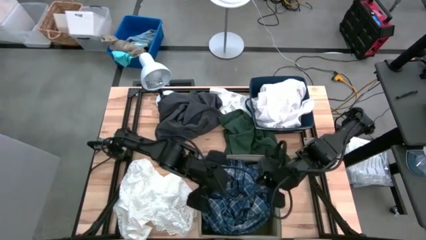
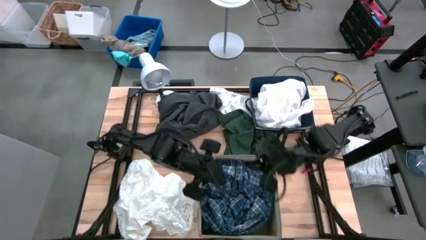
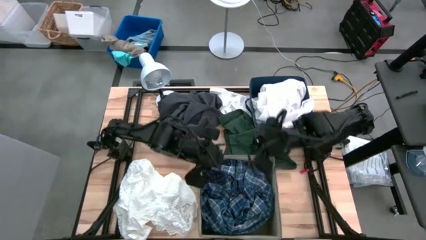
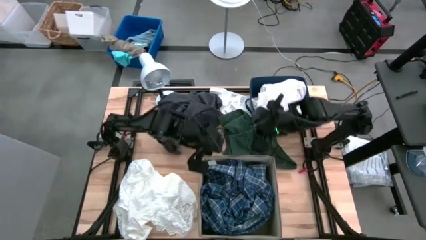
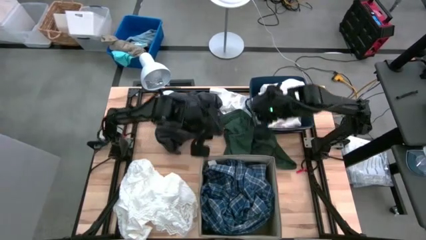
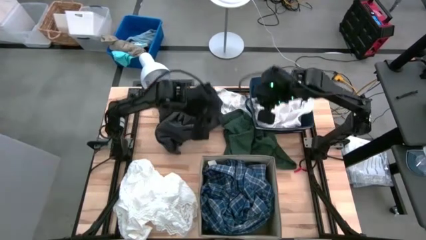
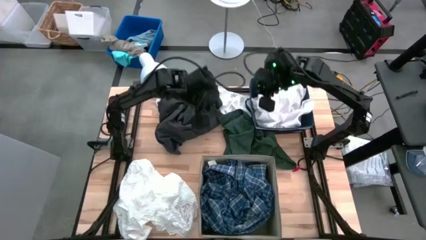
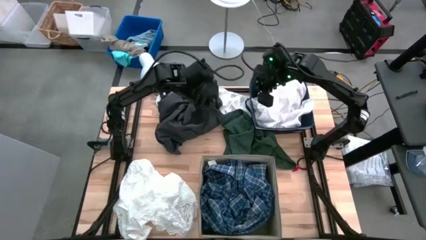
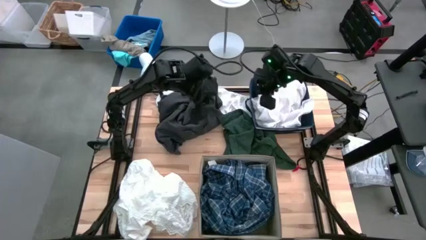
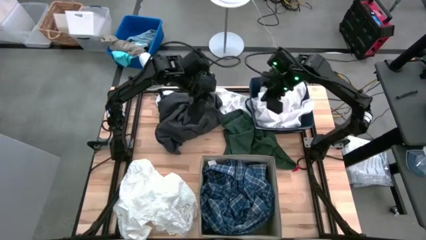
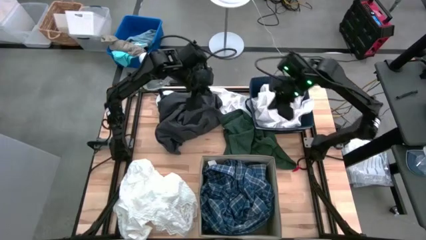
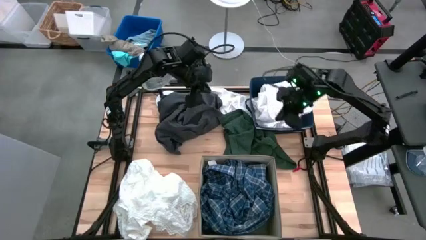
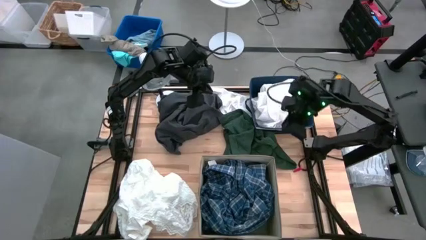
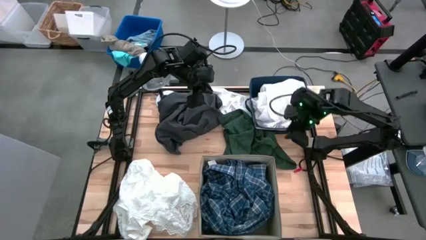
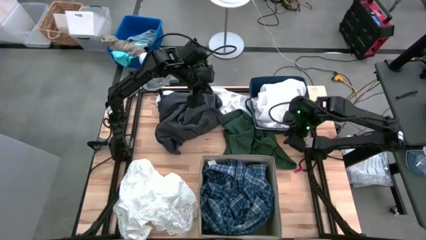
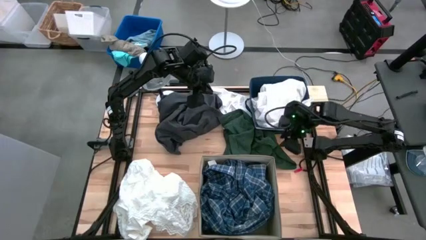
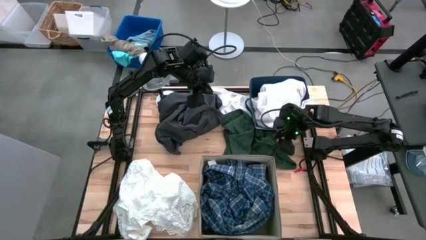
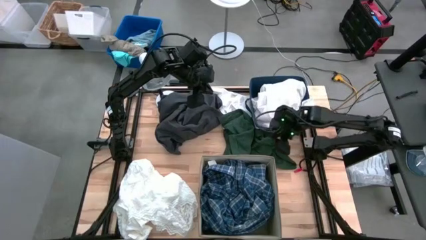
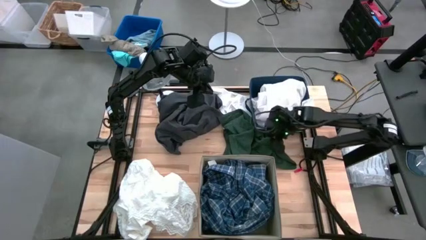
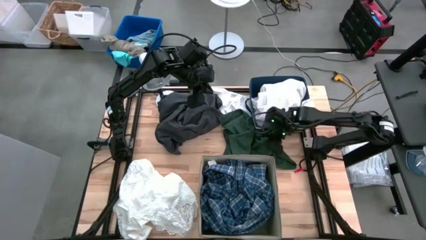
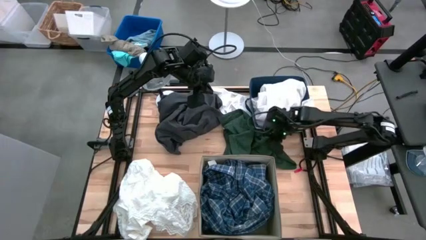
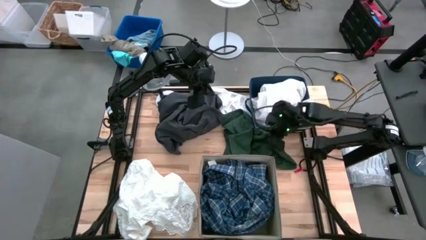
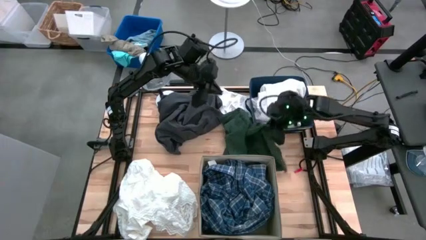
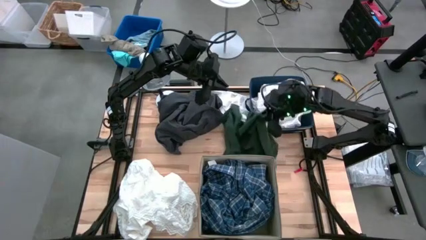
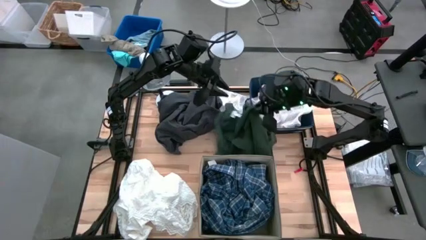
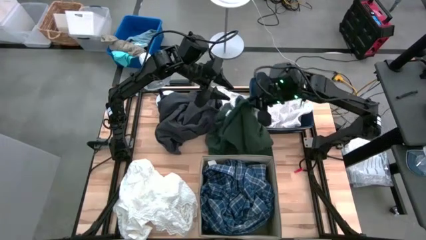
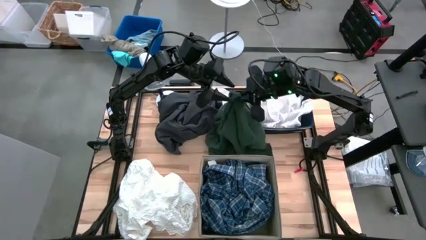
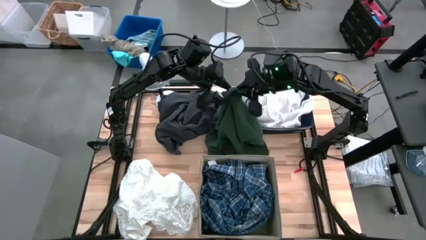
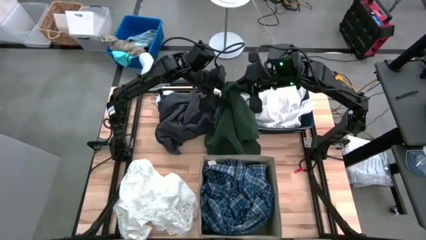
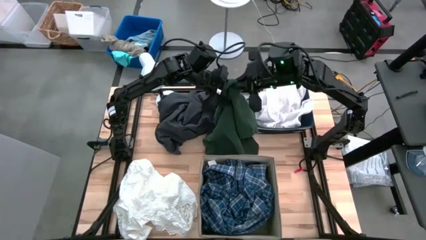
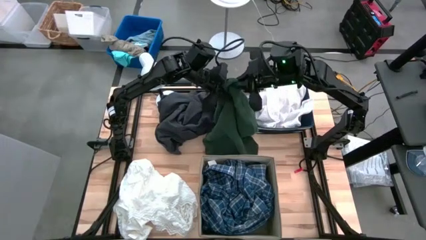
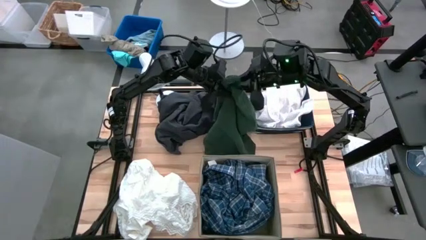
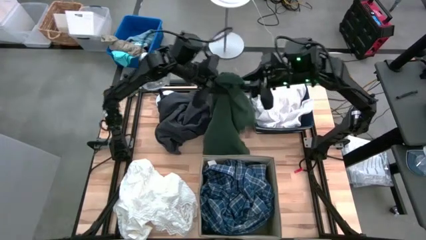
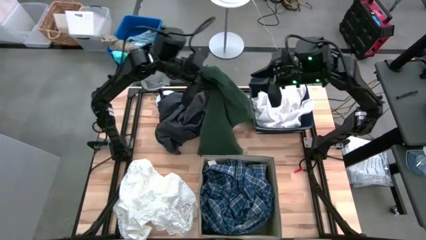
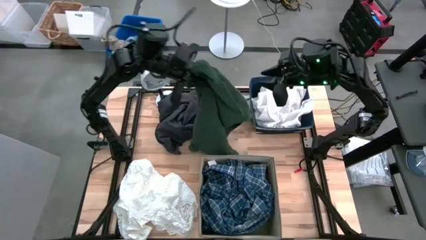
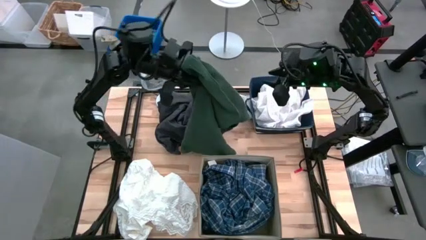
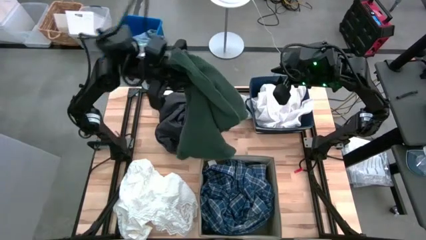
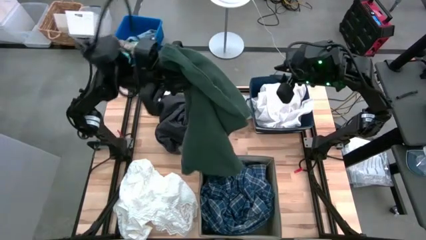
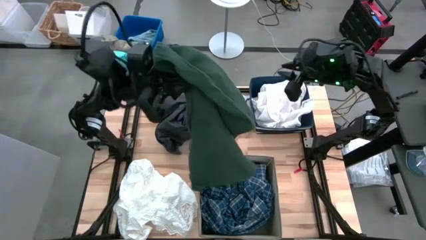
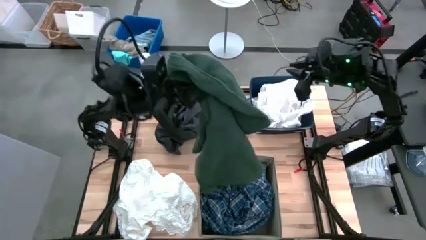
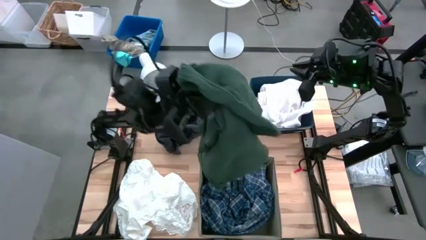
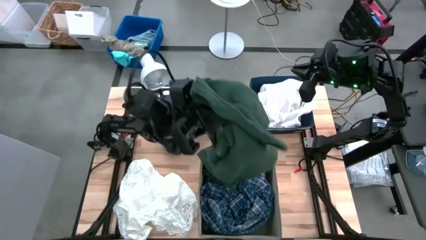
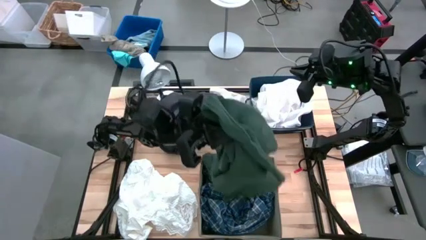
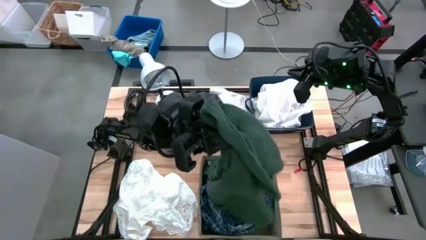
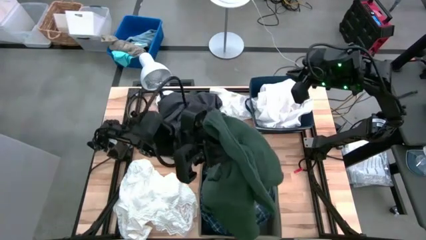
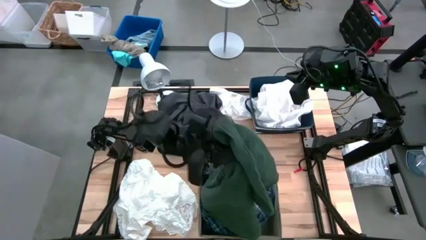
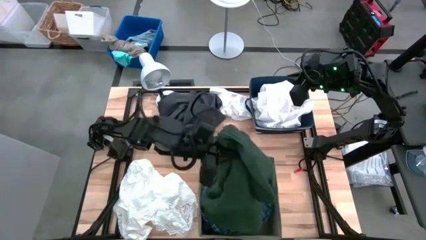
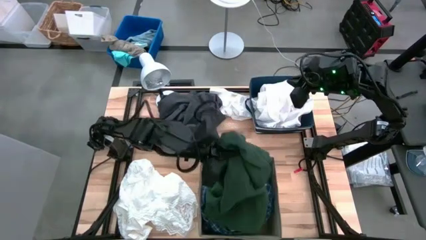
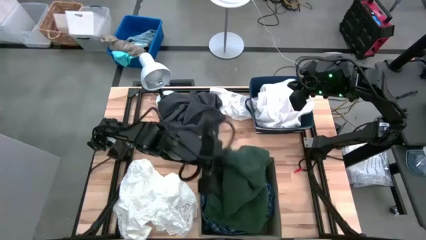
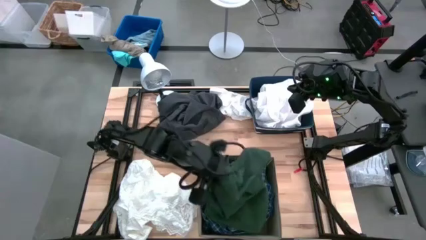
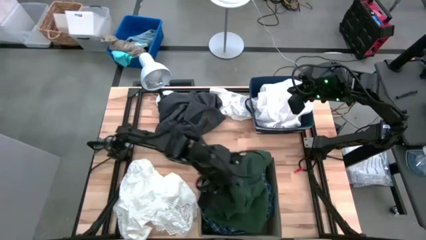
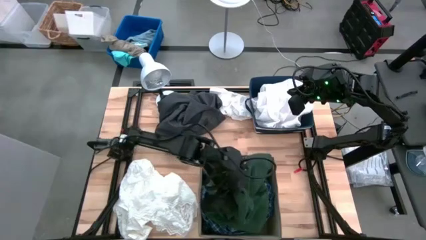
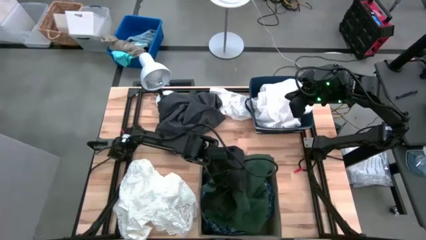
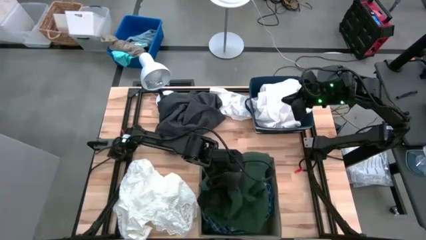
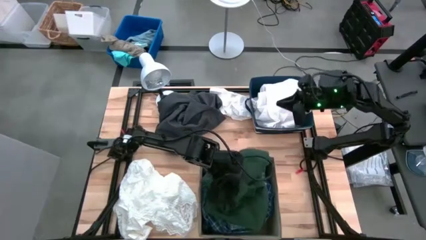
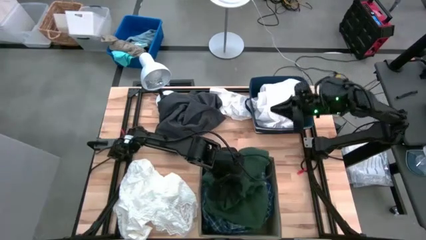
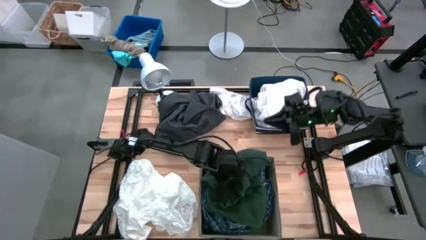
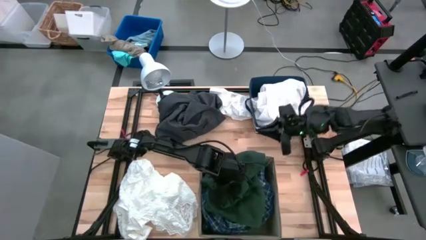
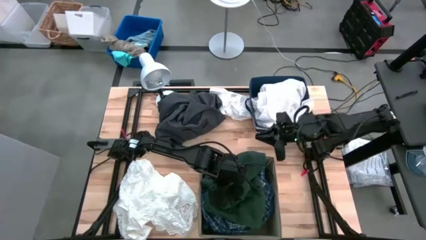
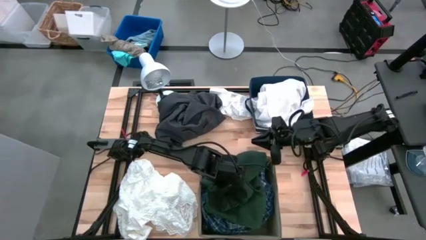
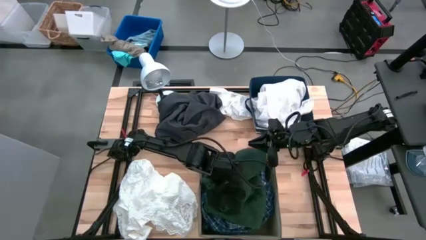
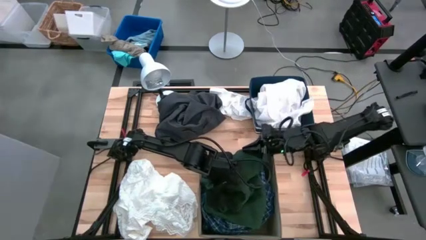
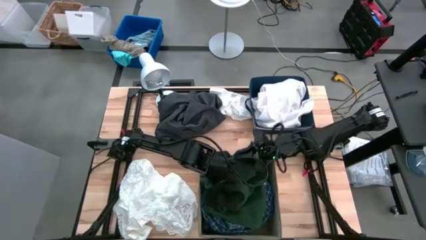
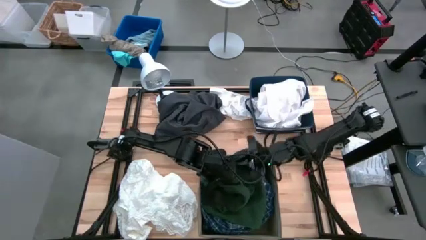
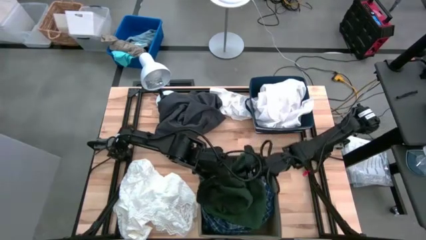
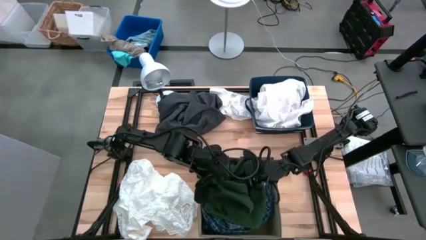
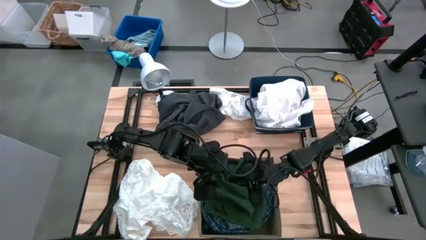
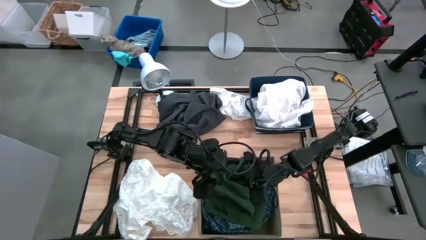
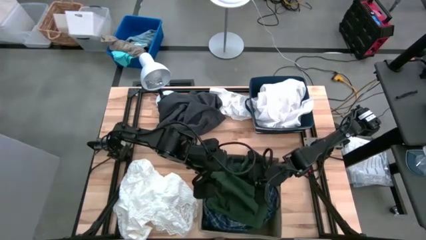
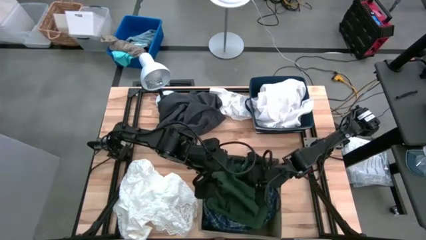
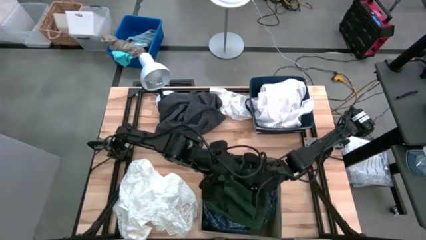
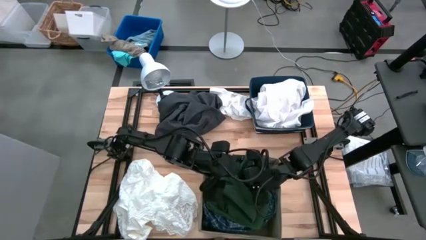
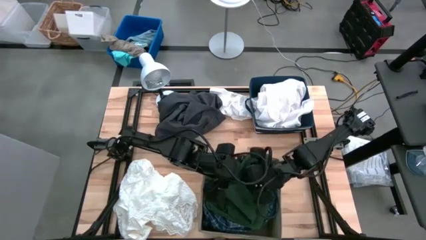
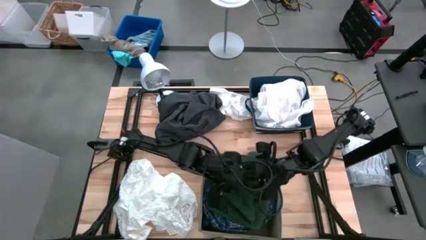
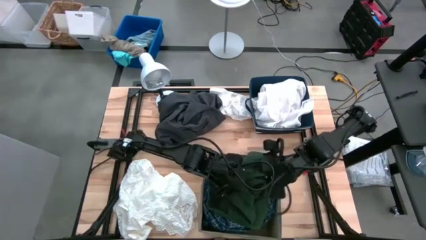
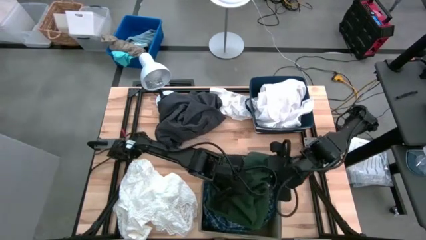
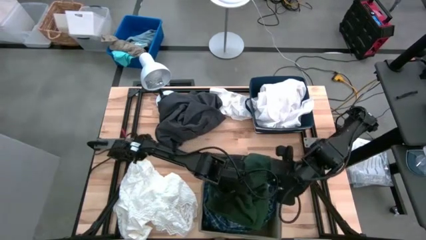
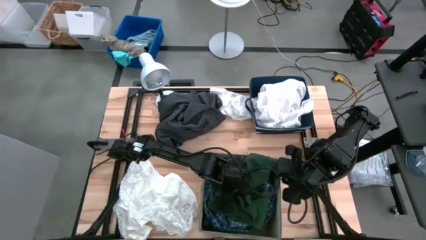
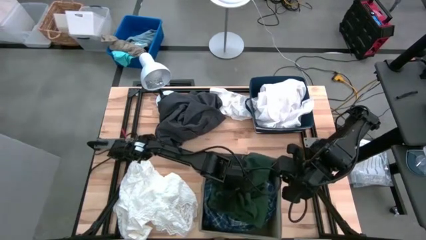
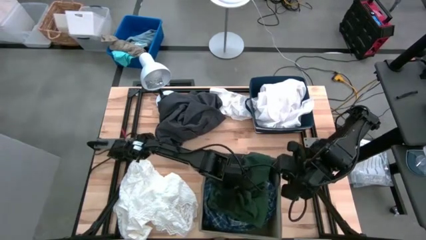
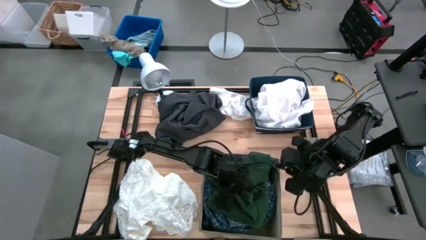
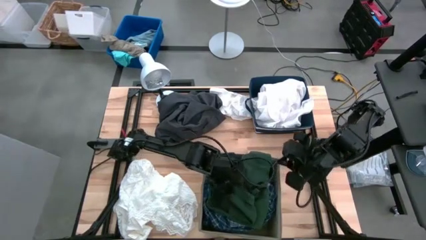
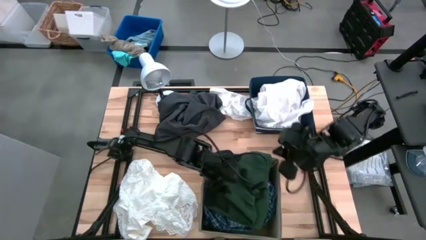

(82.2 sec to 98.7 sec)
Task: Sort clothes
Put the dark green shirt into the brown laundry organizers
